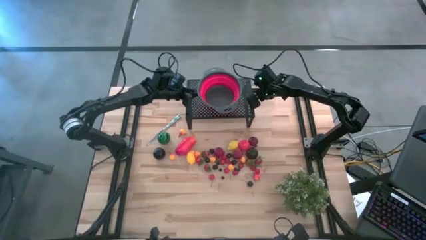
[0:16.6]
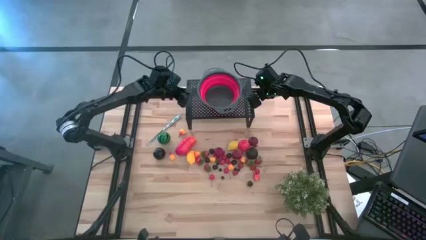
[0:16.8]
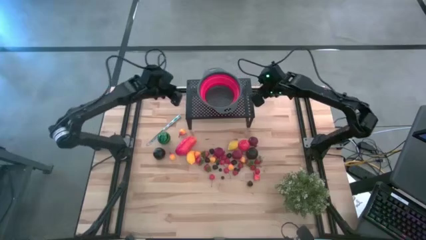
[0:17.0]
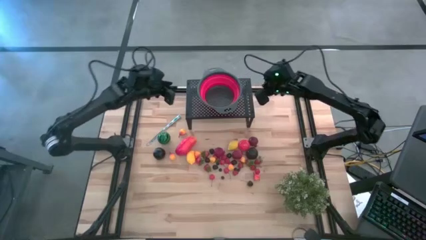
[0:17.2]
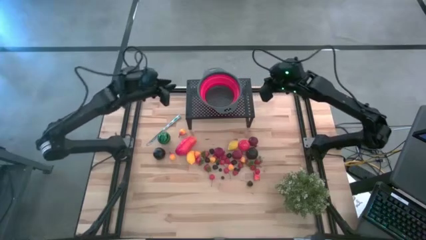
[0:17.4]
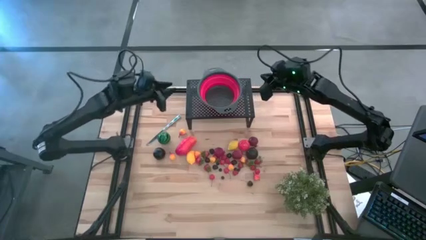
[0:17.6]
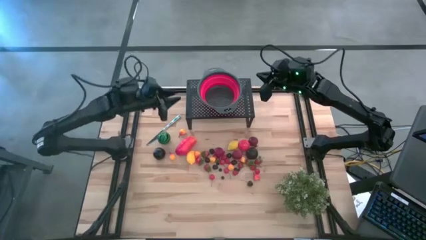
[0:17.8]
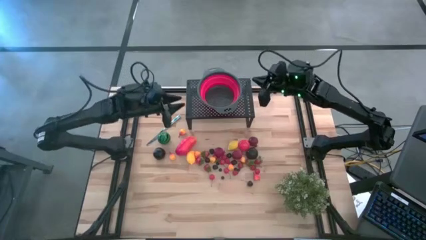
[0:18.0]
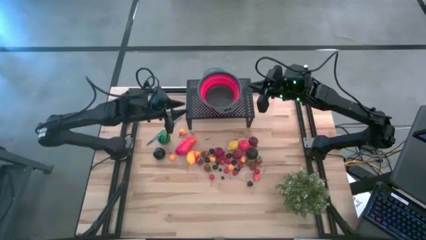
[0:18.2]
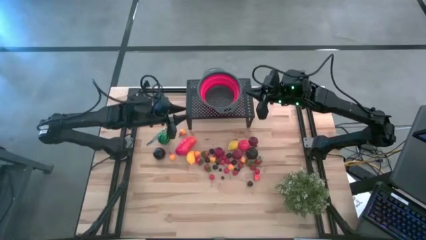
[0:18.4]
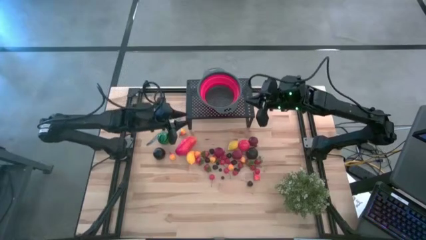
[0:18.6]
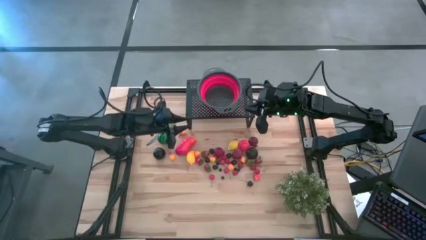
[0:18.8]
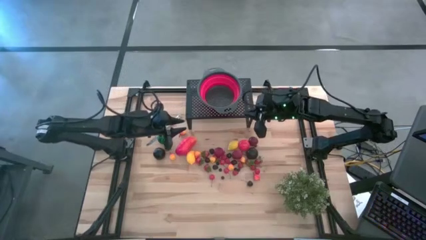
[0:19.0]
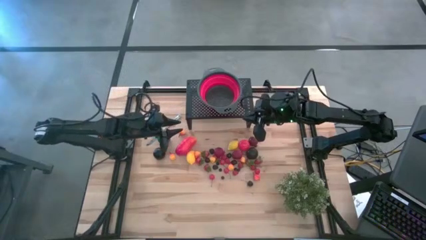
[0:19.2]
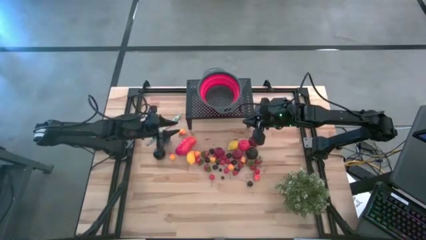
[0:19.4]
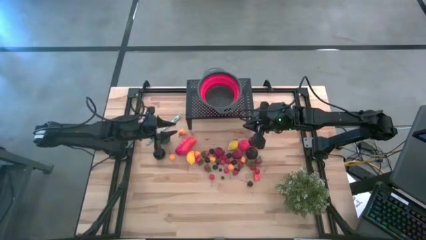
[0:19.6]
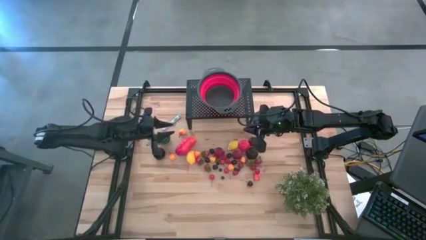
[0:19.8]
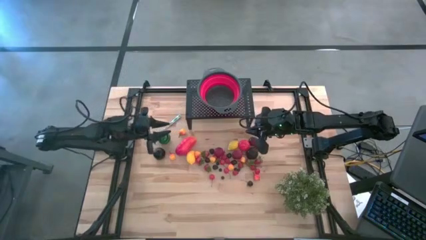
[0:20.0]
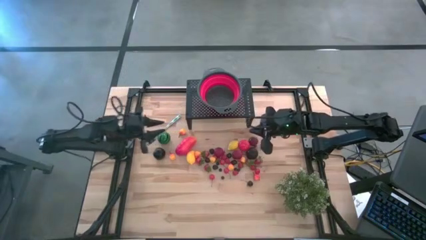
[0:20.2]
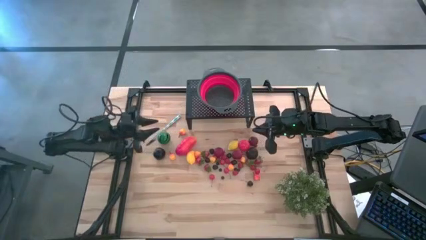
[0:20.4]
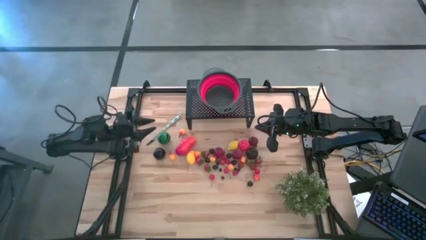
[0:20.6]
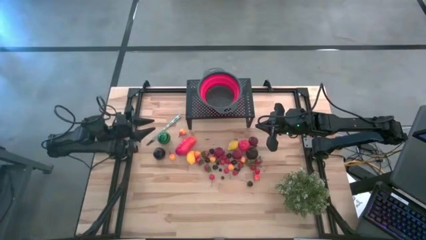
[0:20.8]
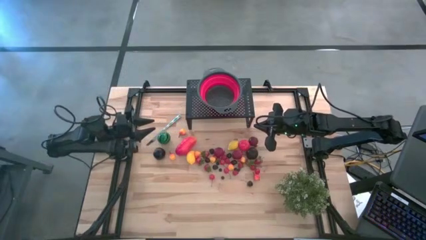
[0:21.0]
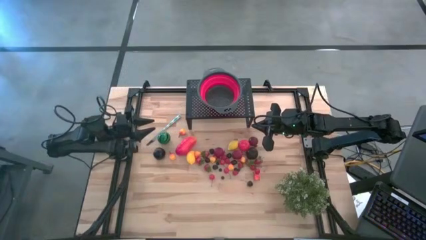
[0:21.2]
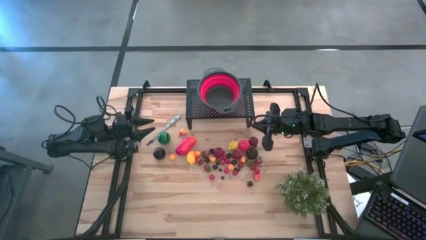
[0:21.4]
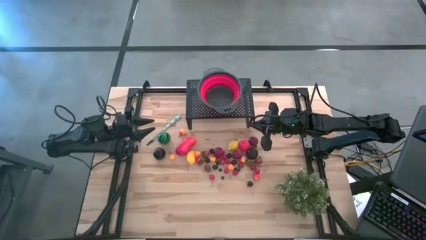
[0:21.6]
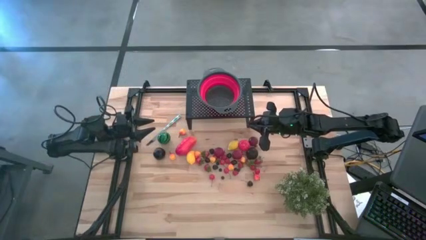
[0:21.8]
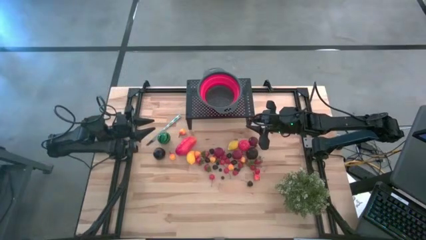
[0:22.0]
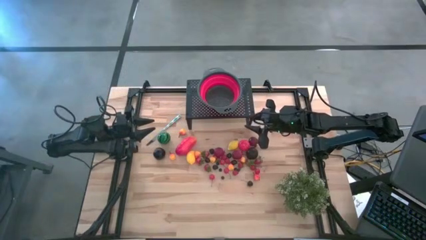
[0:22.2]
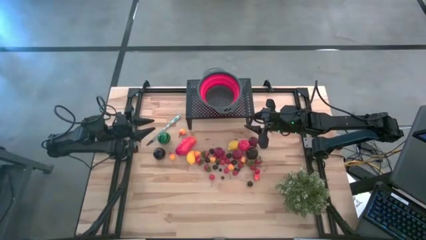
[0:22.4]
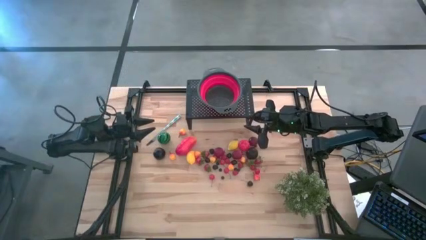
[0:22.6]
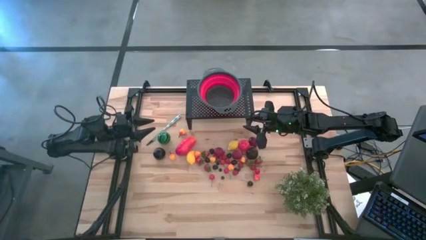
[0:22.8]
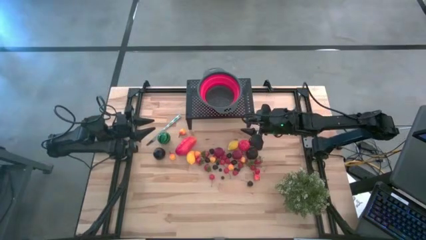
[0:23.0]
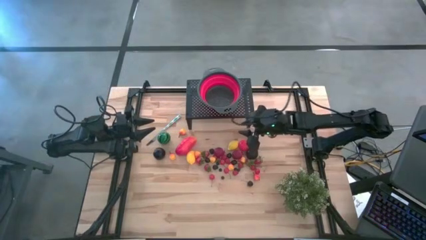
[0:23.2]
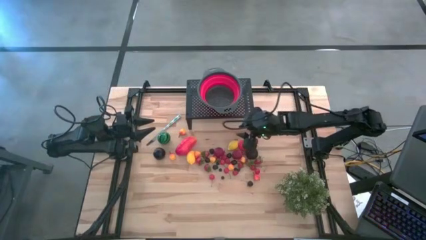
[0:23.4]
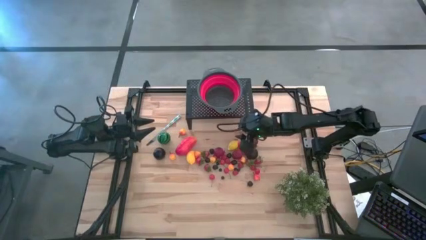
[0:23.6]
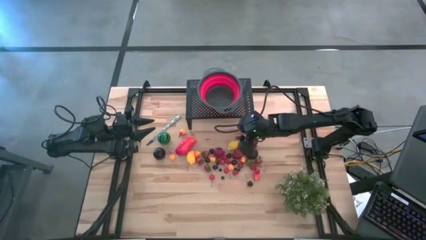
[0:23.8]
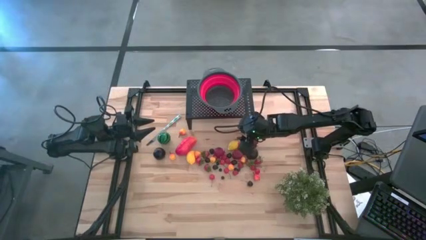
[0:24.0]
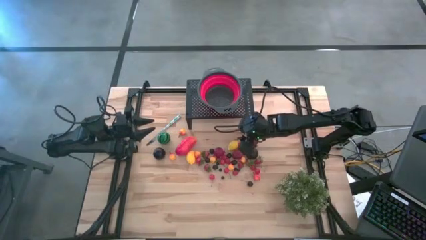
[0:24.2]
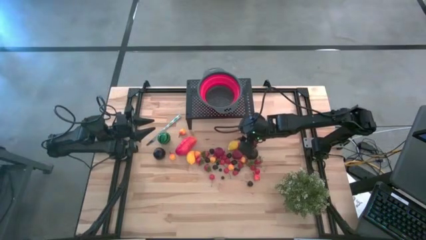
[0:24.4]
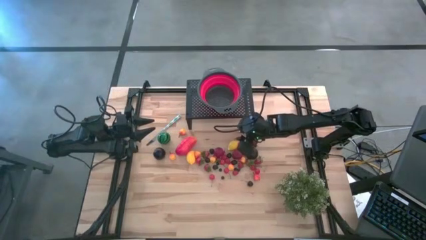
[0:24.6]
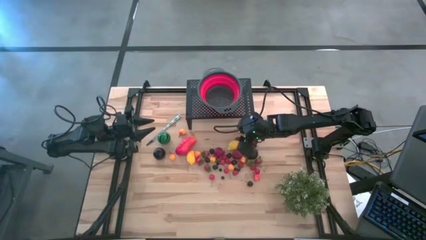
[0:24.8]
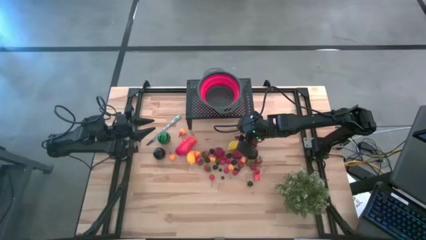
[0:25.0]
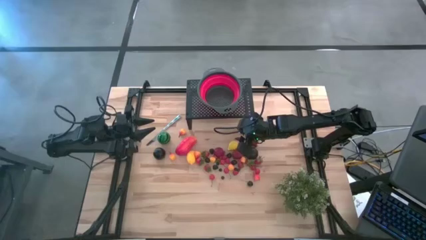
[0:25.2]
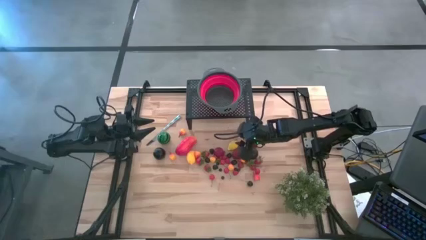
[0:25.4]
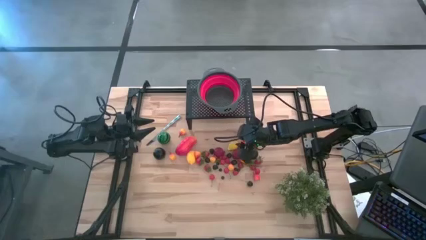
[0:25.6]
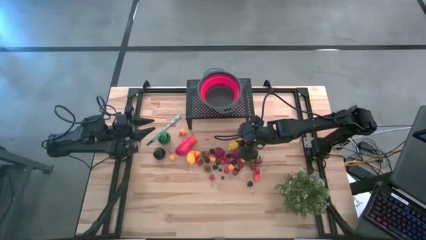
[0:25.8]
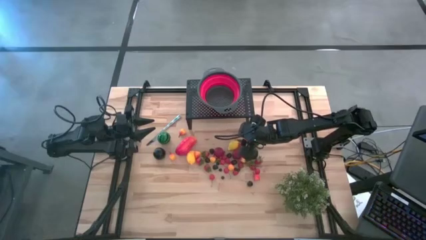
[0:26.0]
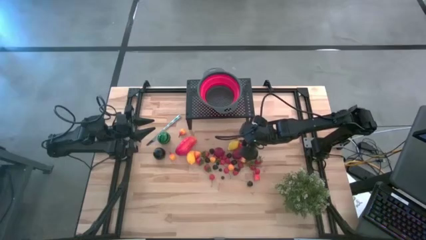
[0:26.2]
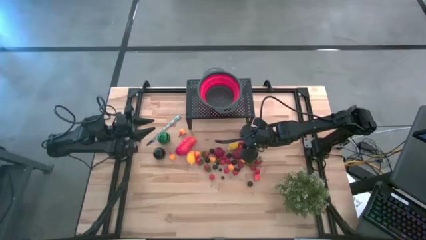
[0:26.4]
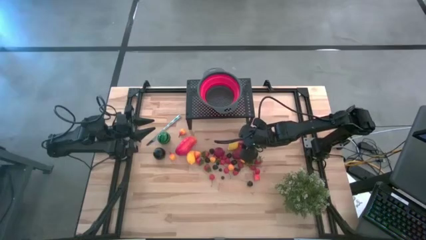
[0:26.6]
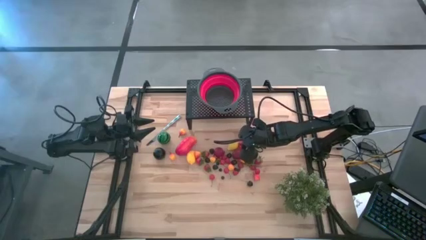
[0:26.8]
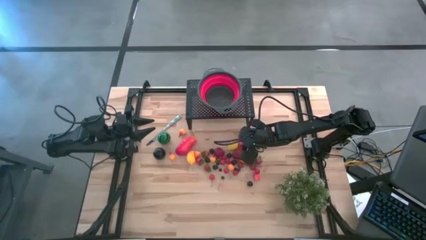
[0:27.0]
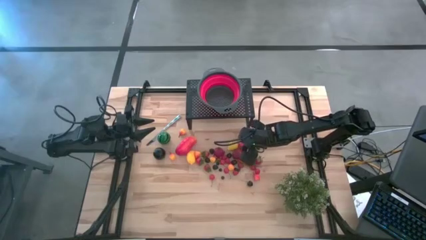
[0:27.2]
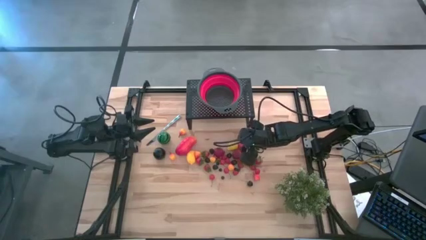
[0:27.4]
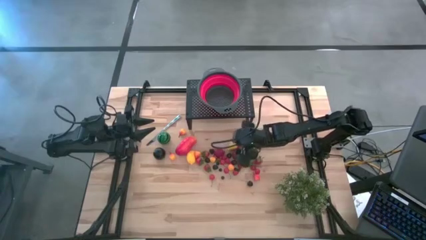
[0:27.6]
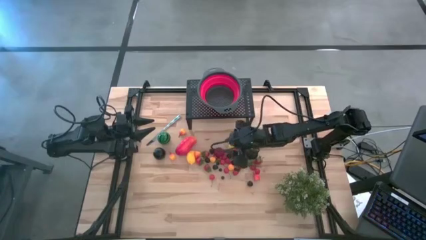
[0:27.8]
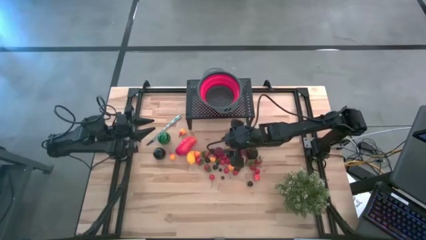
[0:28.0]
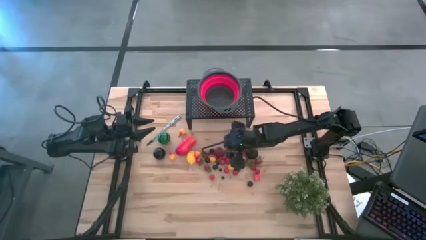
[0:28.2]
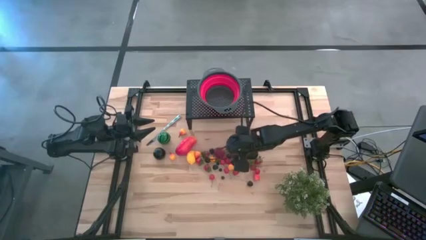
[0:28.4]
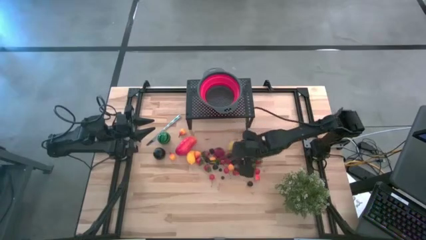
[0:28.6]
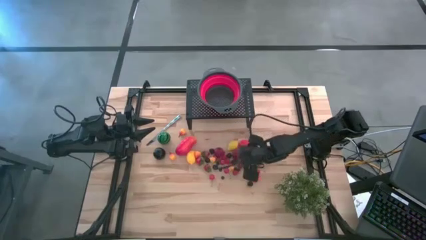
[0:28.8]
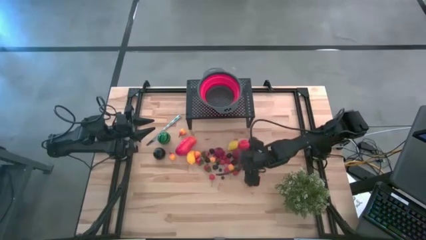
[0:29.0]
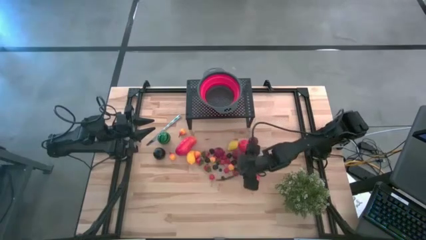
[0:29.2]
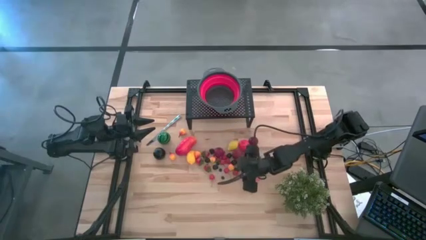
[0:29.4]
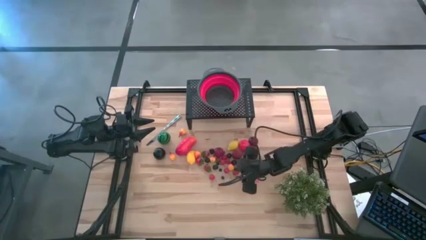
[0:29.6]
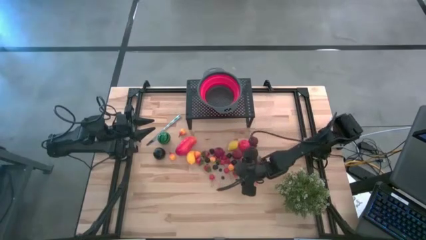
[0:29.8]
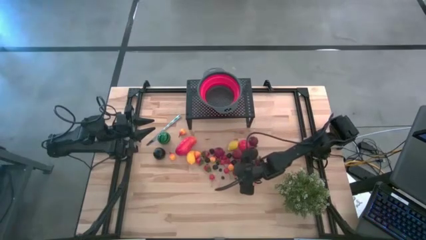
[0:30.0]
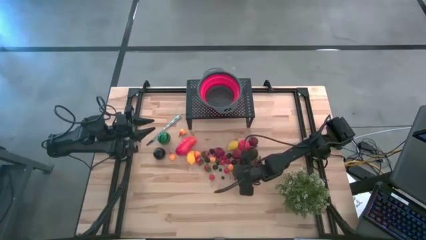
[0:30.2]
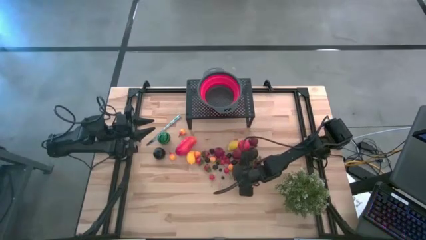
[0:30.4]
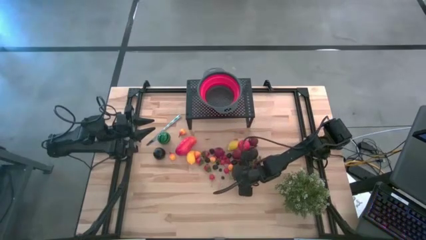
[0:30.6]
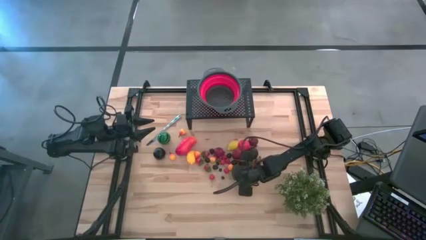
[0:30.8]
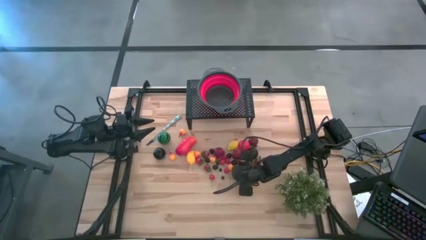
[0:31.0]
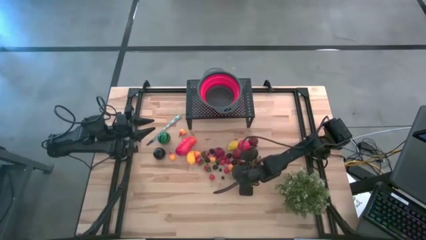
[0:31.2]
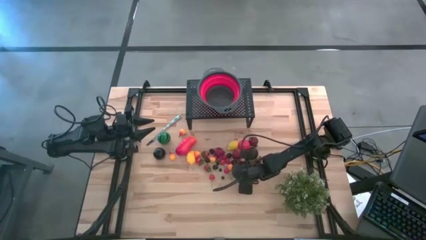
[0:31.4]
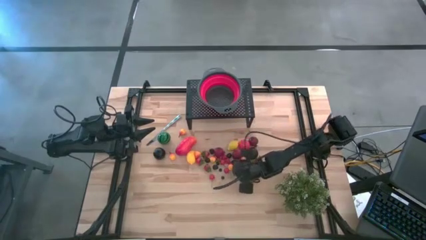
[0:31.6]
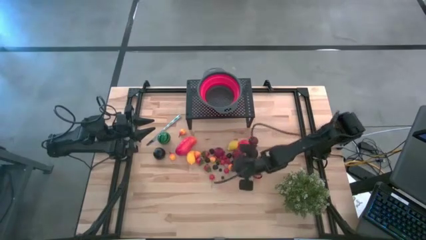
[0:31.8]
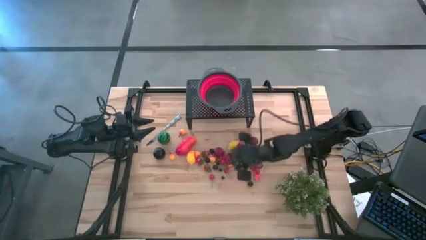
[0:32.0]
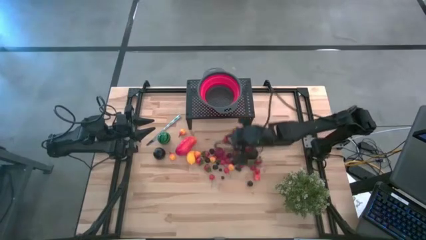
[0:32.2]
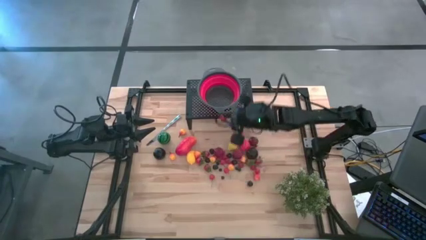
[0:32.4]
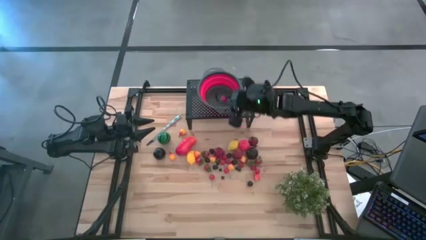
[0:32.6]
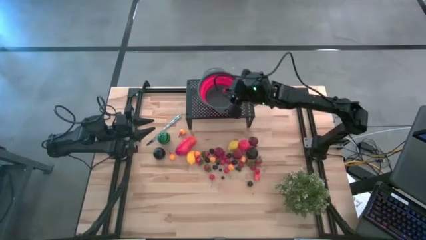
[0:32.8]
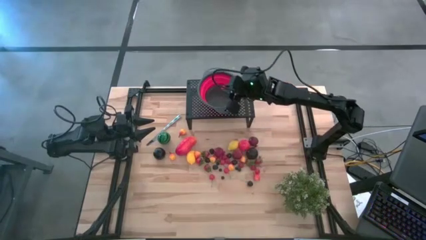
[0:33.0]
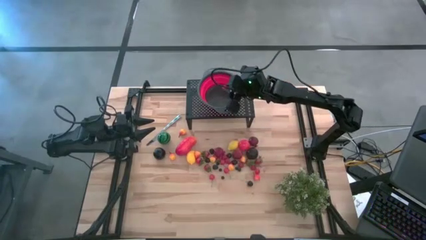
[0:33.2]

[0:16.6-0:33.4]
Task: Pick & Place Fruit
Put the raspberry in the red colander on the shelf
